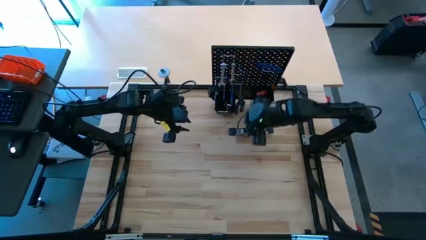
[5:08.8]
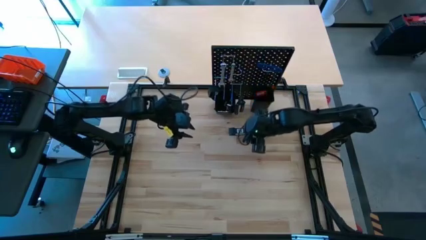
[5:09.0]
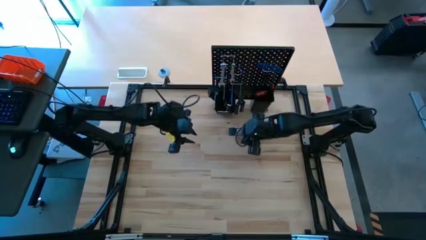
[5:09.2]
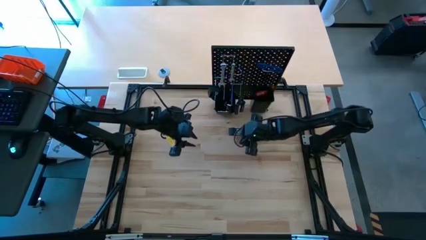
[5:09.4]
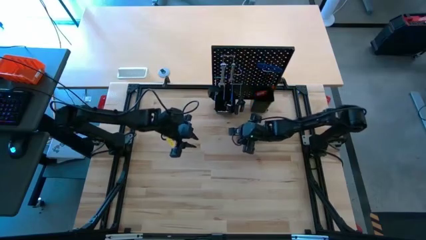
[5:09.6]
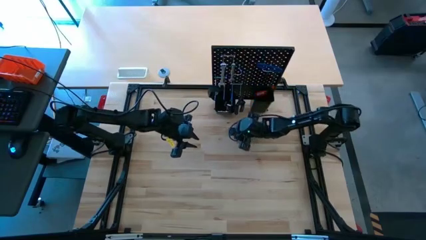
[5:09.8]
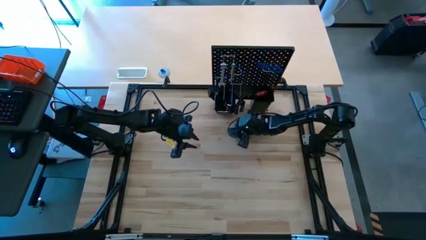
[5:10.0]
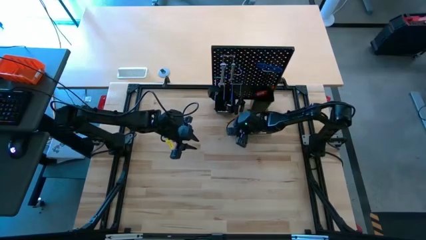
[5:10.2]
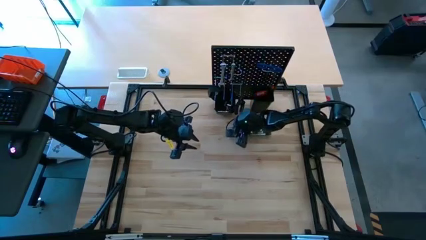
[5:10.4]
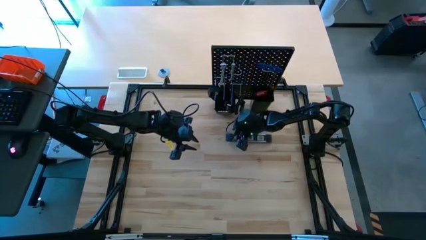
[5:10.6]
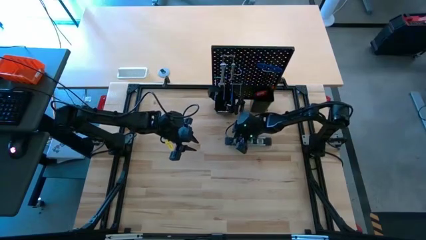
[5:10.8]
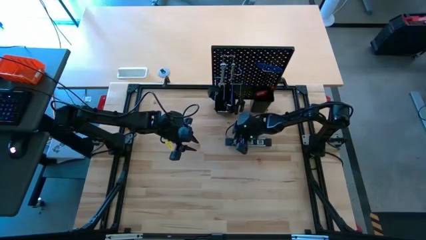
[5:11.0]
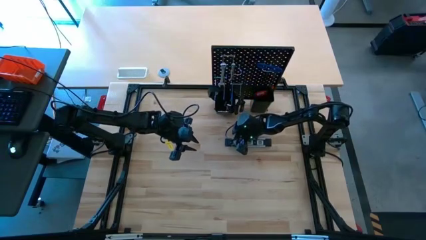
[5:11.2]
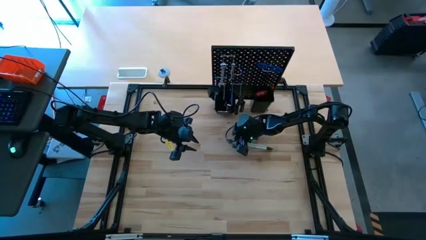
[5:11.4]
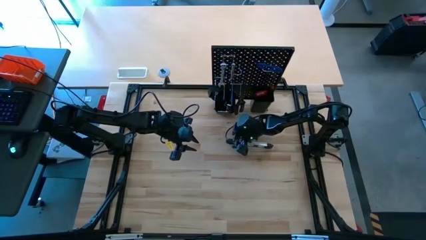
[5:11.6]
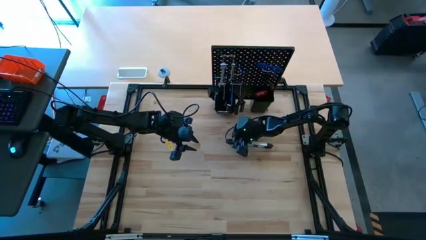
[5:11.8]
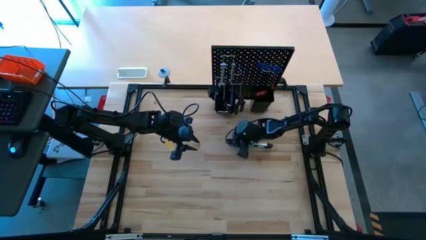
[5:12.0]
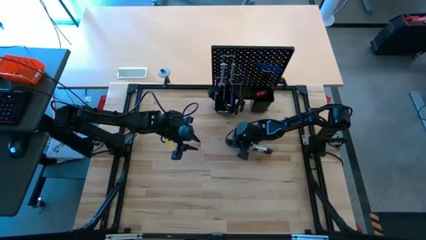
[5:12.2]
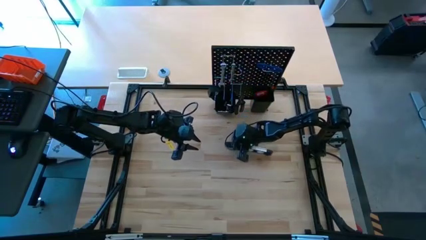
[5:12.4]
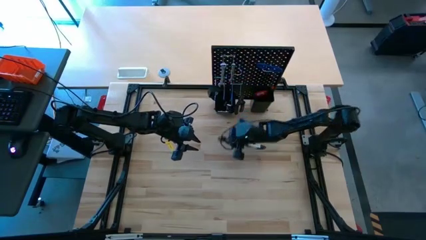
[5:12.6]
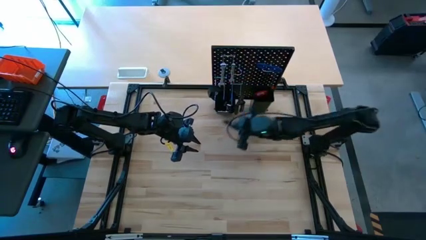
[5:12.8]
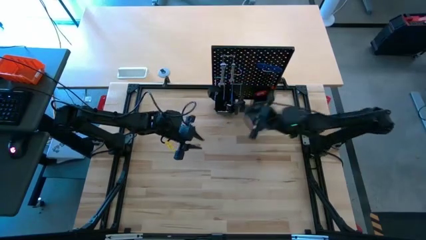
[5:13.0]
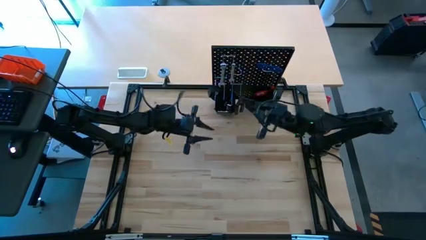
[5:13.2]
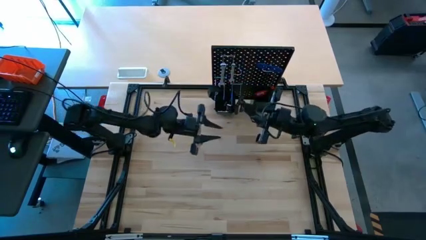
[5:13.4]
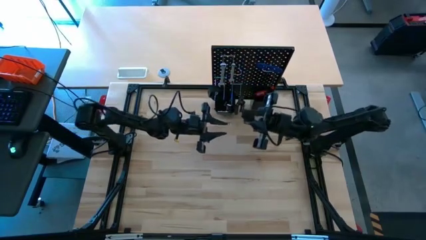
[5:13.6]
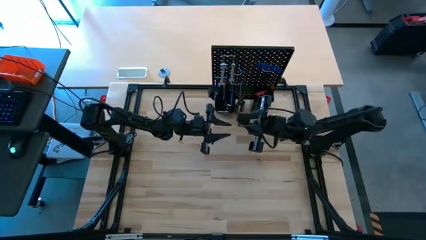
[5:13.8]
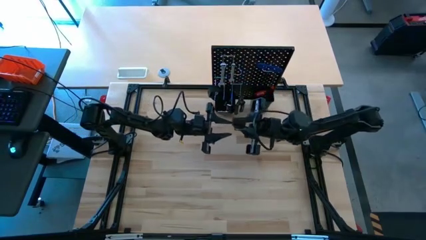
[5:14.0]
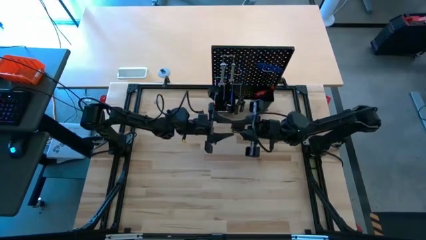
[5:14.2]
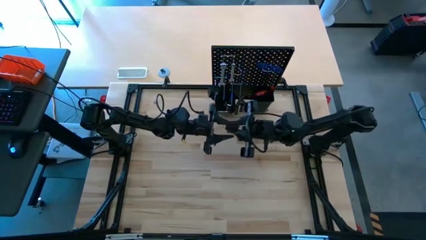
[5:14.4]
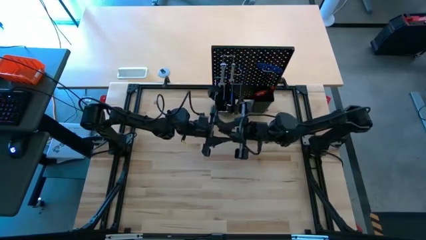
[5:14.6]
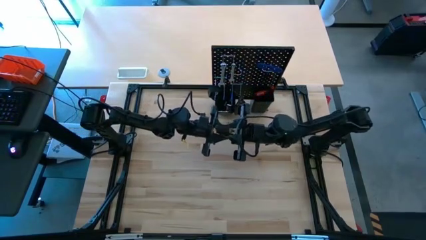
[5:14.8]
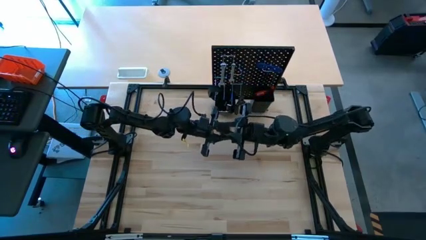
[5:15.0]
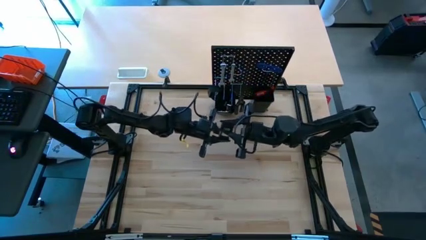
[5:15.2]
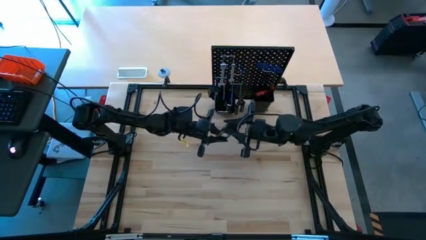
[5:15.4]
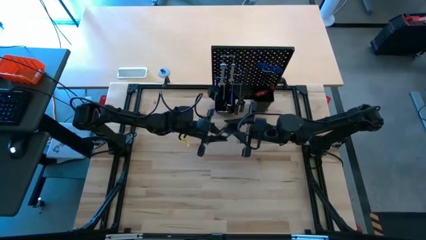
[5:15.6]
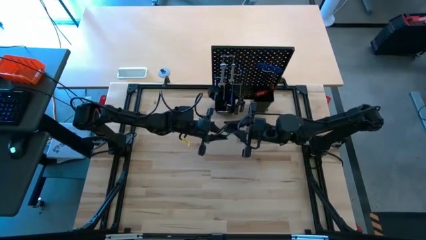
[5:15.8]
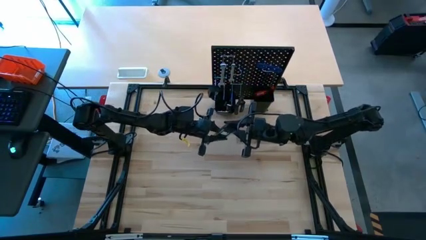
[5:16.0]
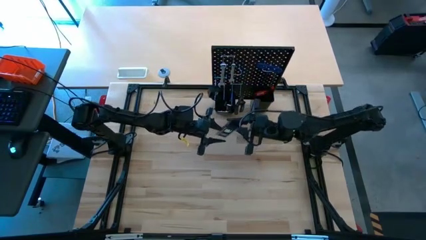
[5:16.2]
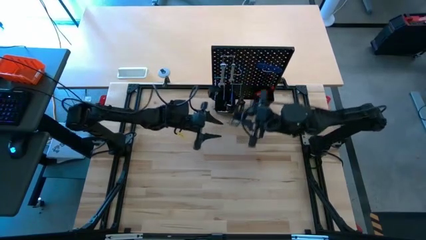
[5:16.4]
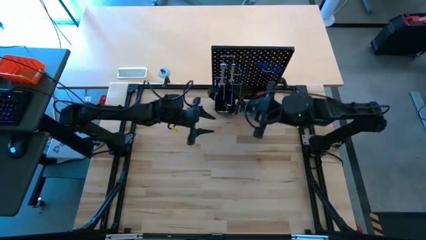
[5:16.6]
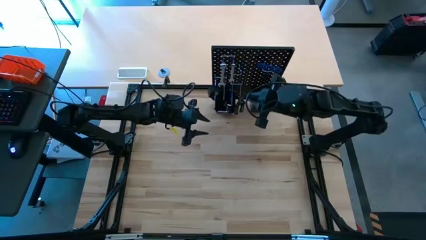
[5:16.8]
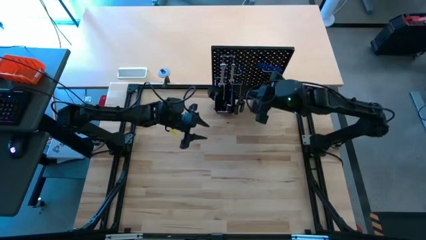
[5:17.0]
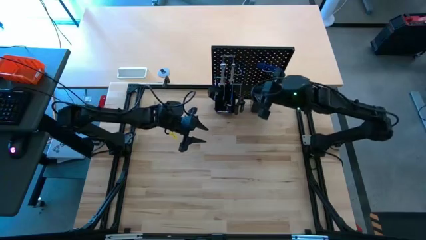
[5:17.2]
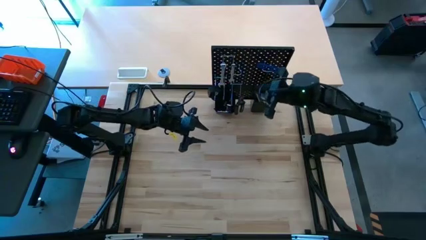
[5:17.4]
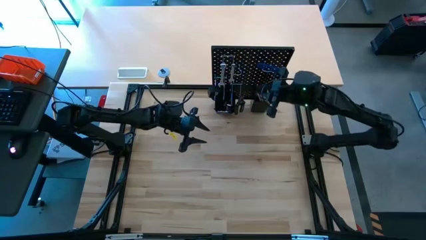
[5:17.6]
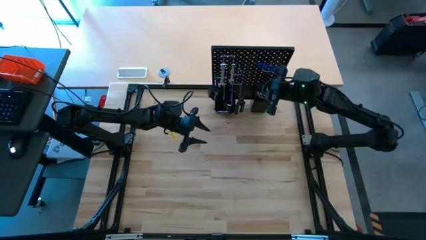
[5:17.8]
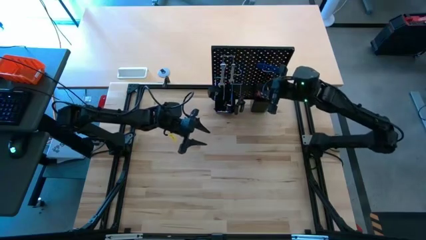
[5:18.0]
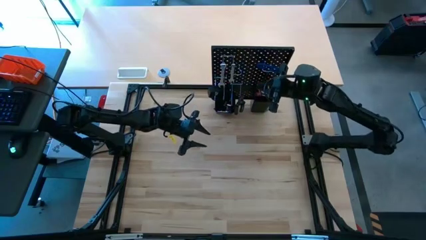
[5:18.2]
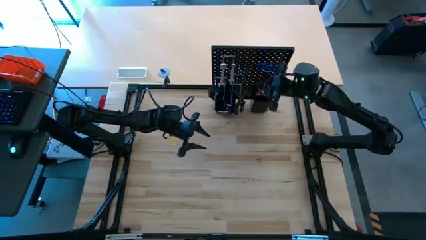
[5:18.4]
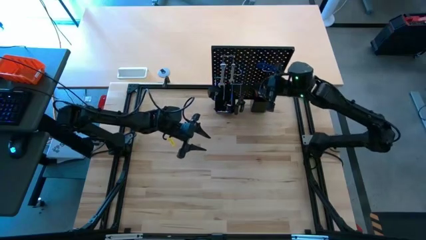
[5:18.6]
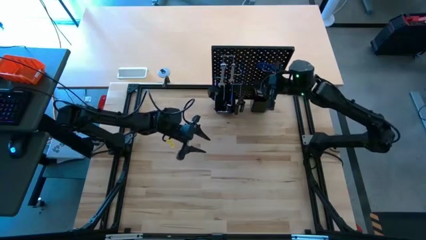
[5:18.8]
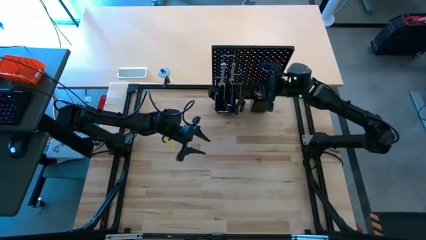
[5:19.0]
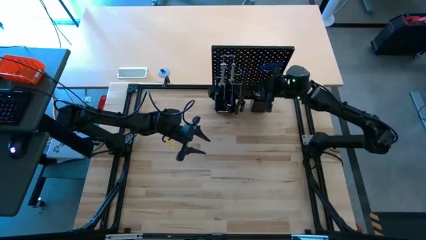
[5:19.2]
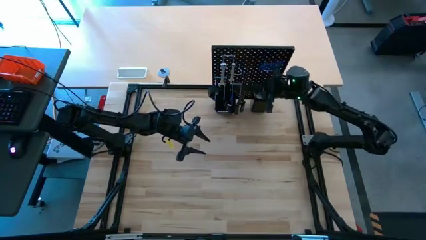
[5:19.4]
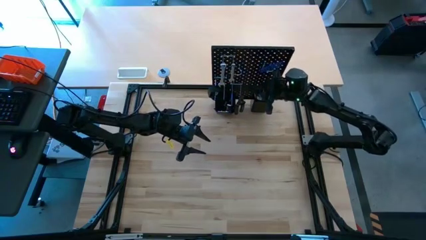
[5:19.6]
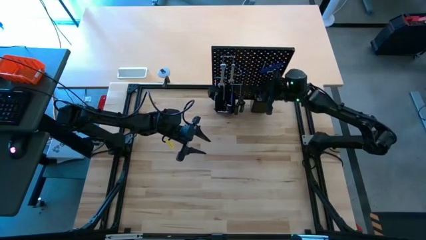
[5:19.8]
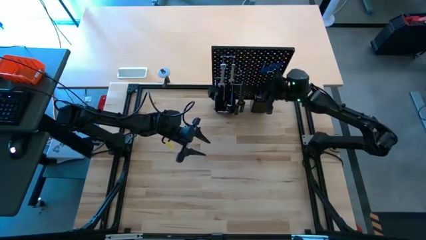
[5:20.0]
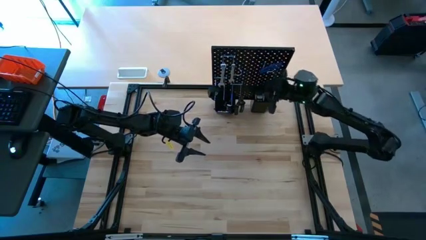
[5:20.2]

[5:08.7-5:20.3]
Task: Hang tools onto peg board
Put the Spirit level into the right bin on the pegboard

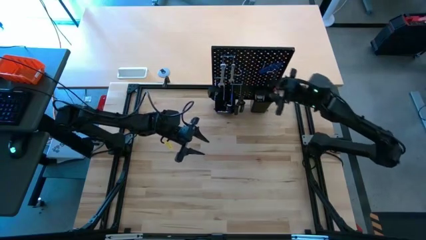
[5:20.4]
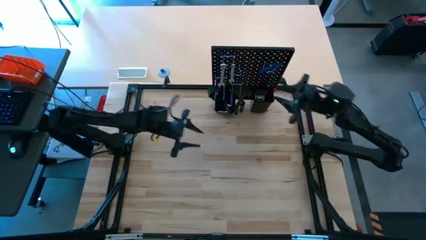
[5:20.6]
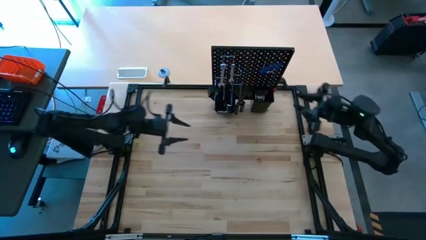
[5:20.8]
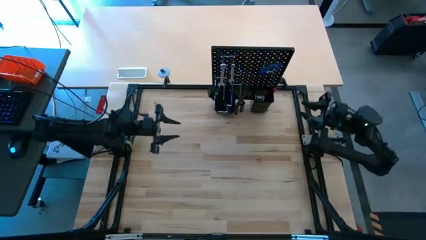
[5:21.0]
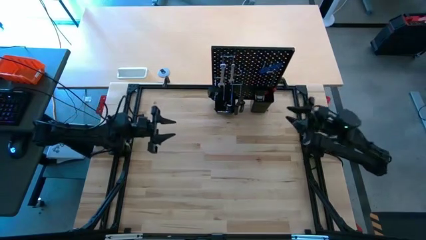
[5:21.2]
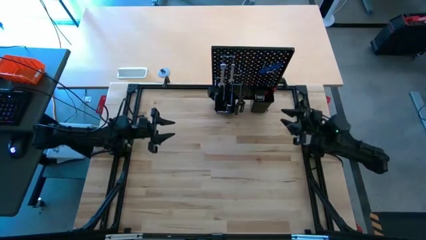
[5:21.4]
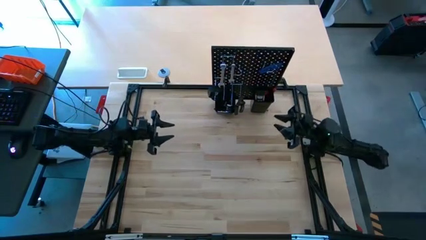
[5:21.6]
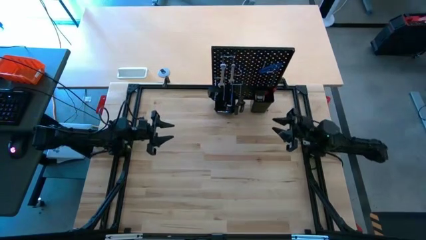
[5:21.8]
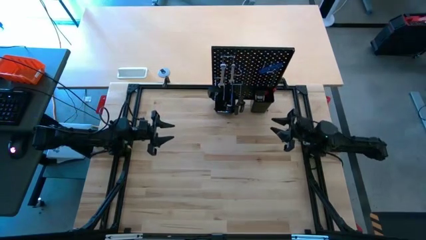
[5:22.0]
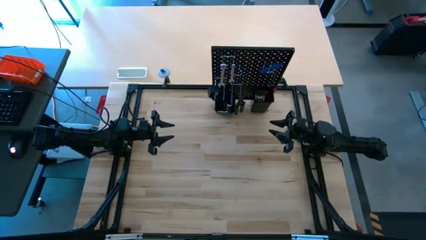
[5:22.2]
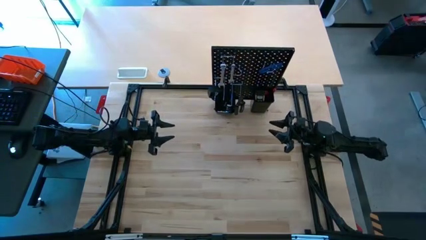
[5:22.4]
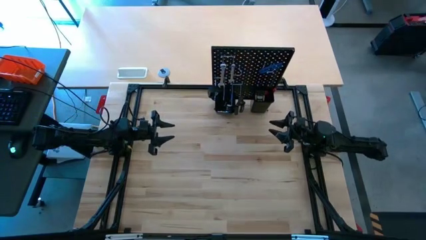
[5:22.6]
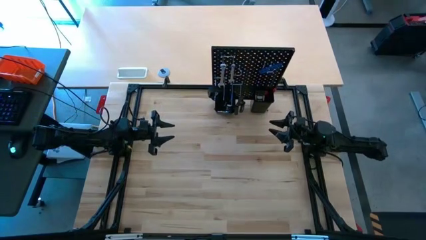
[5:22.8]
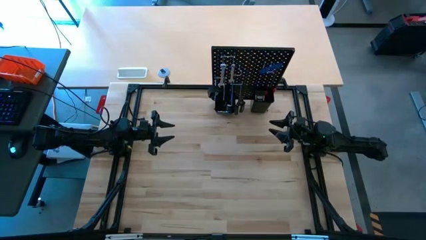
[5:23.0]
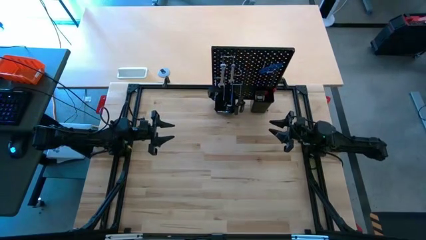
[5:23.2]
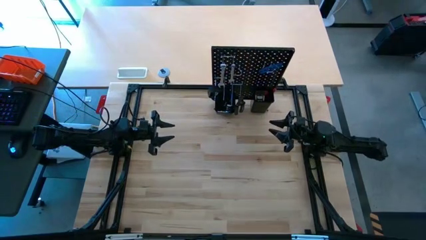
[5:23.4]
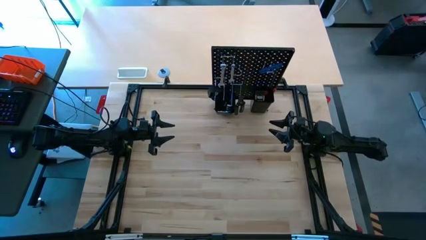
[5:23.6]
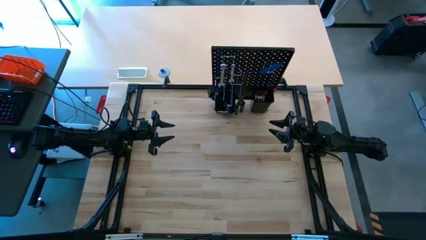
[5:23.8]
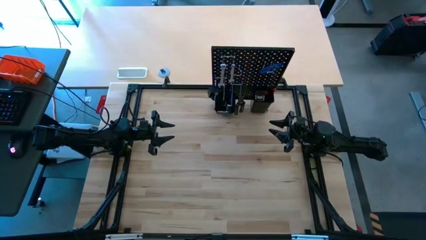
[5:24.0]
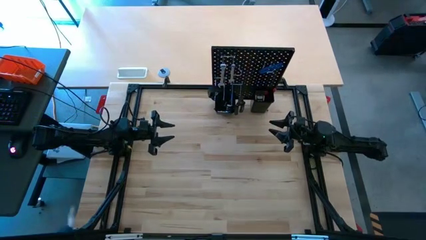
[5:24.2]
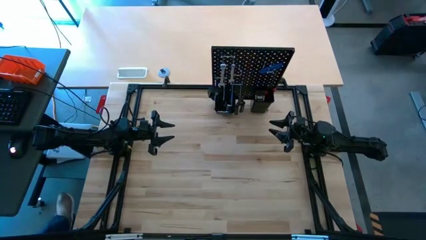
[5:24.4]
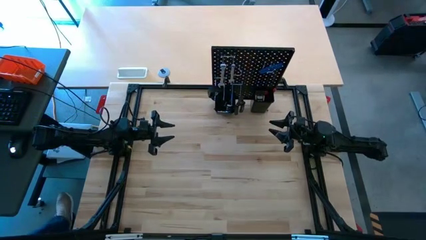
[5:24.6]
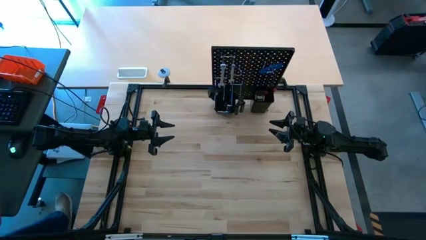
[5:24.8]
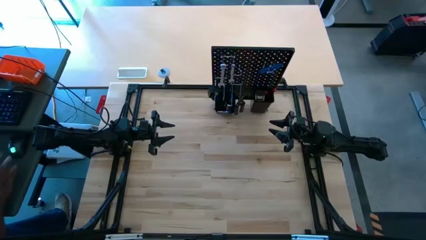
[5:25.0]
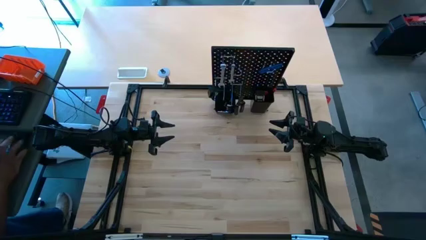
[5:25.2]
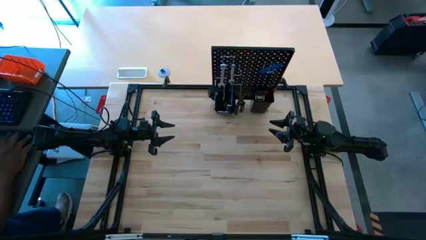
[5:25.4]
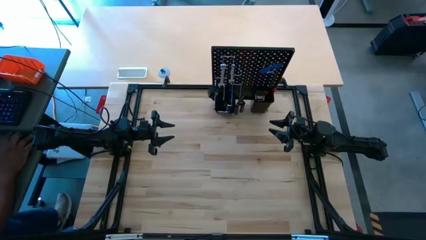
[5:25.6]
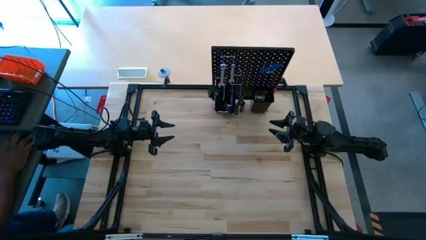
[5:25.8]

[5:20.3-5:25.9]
Return to Home Position
